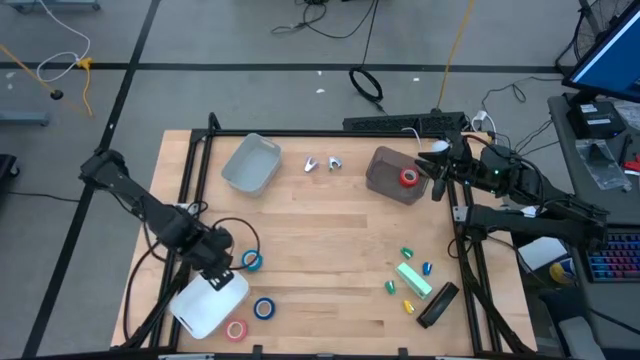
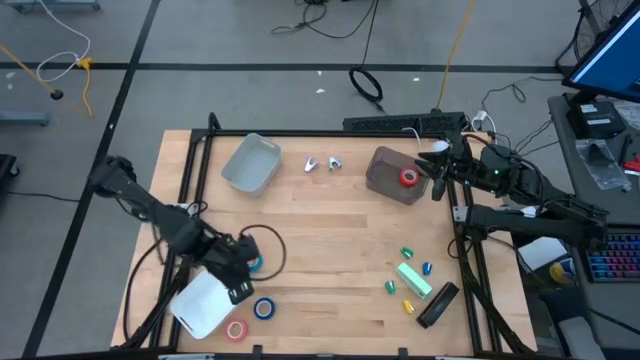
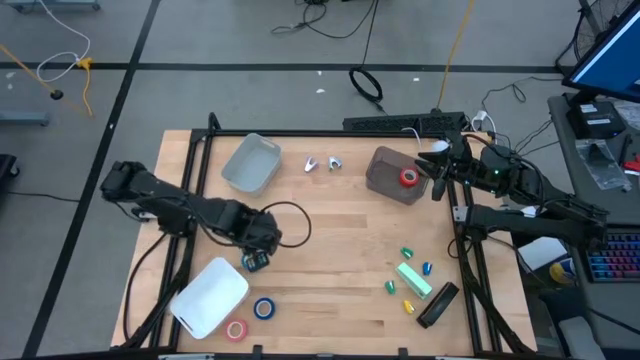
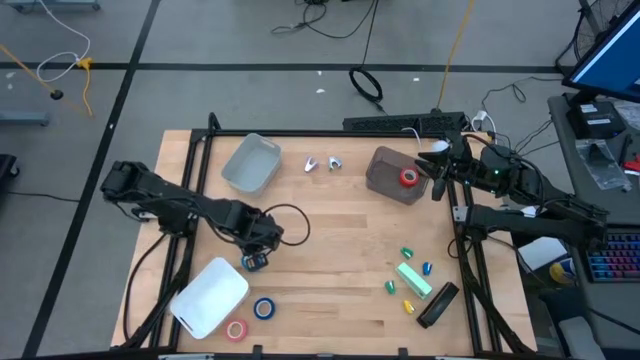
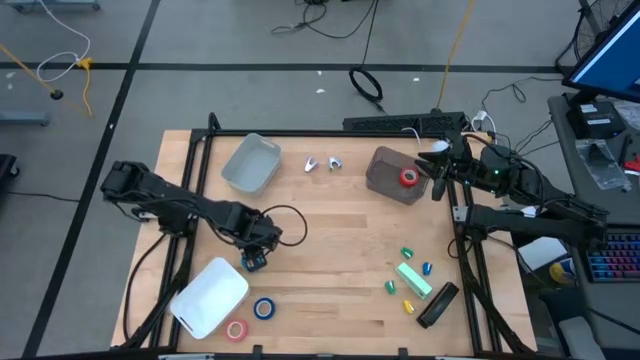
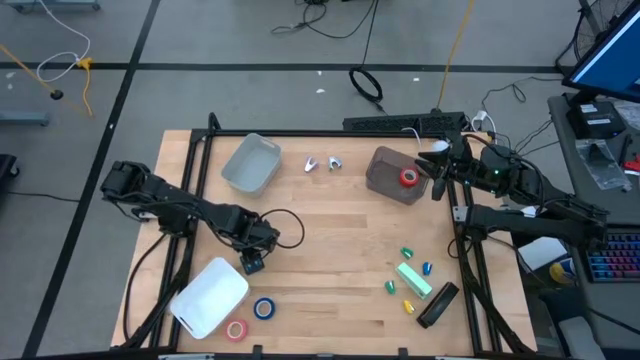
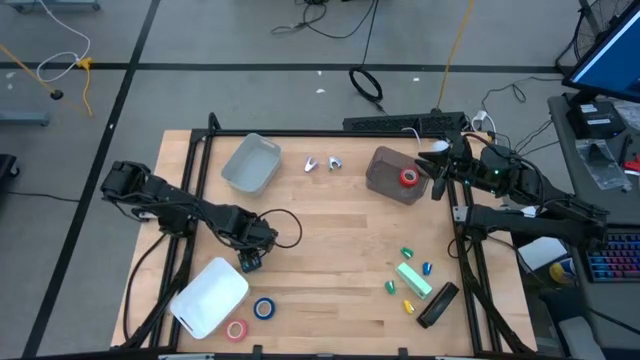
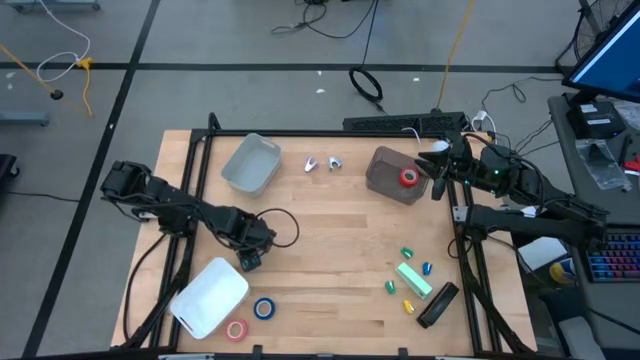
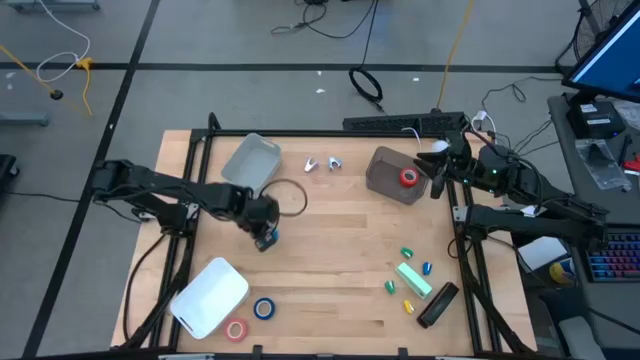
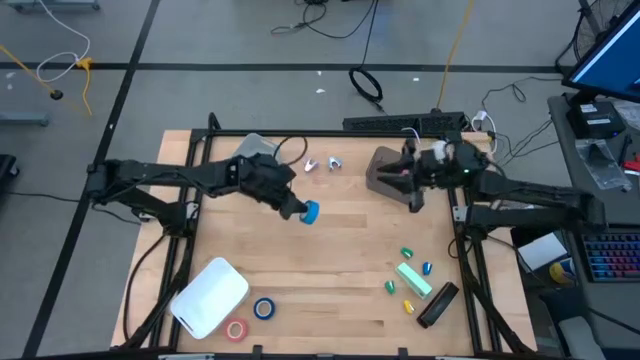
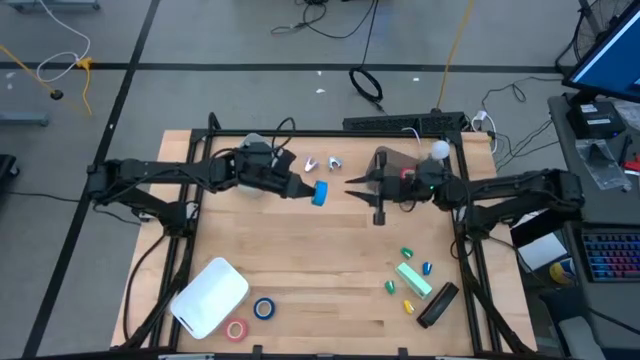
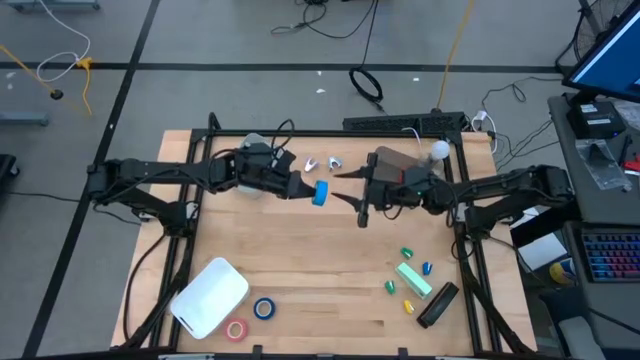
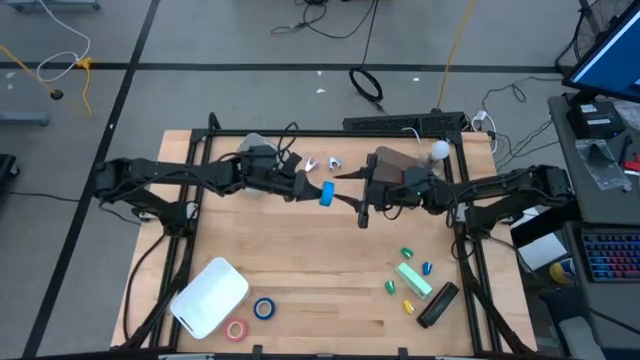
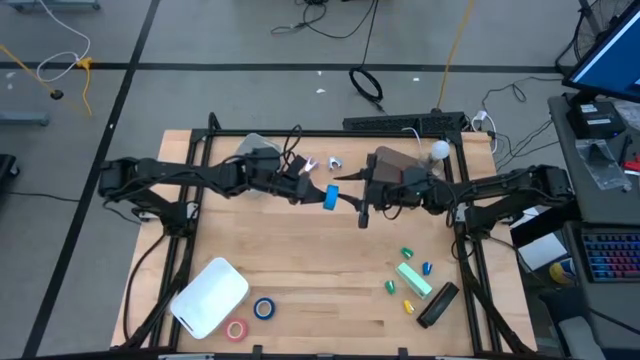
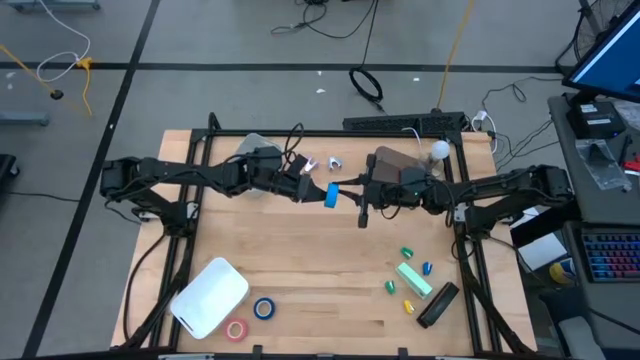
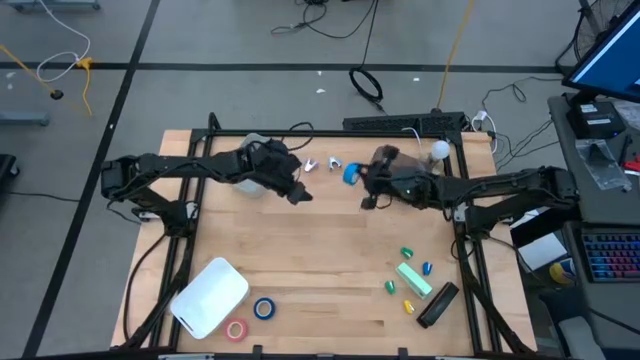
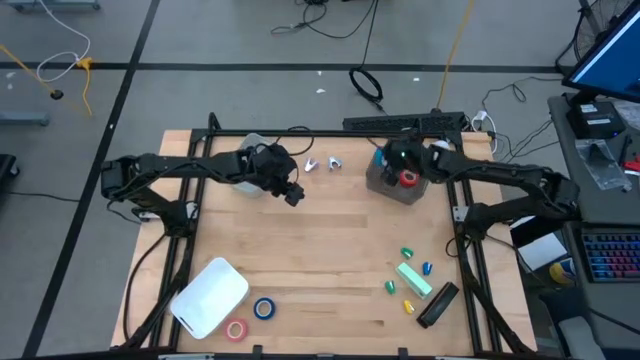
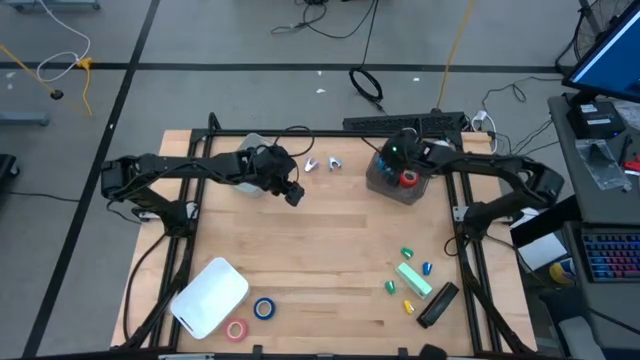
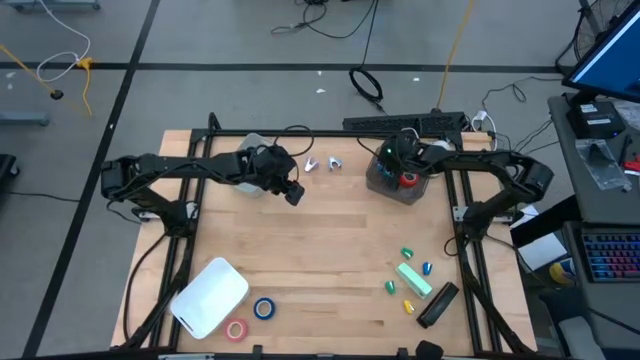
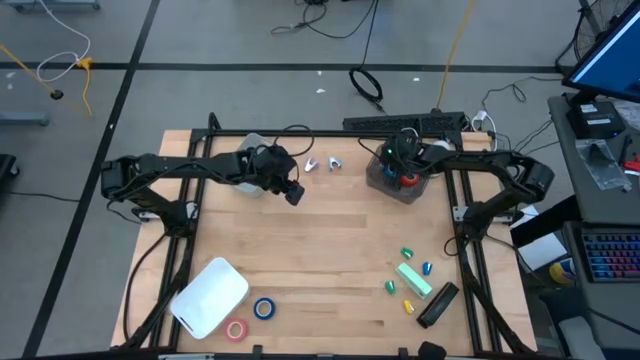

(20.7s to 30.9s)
Task: Pick and place Stapler, Stapler remover, tape
Put the light blue tape into the black bin

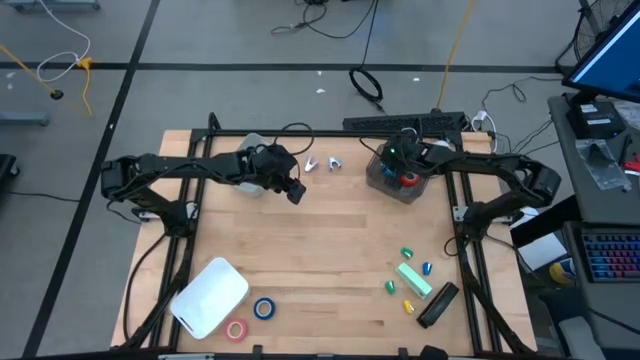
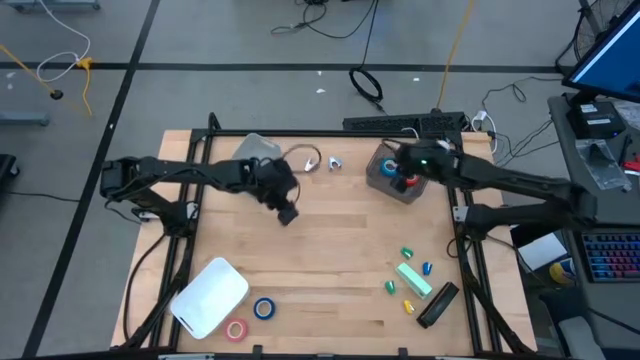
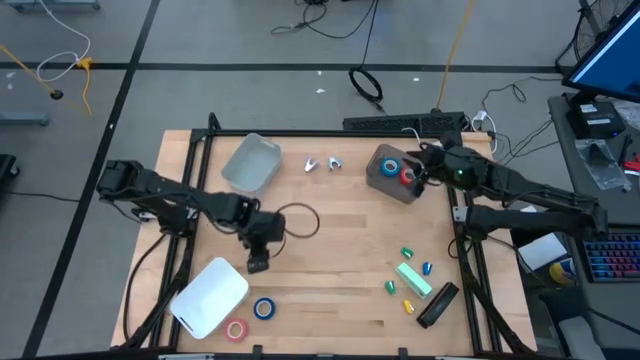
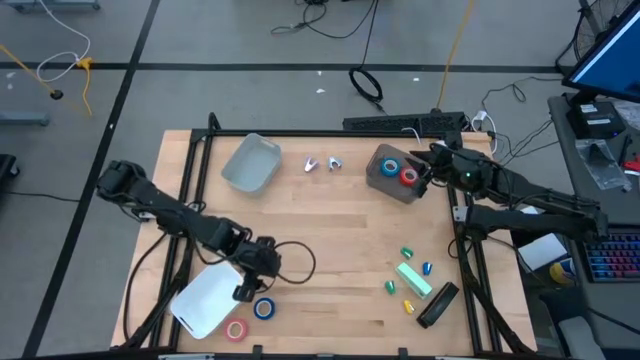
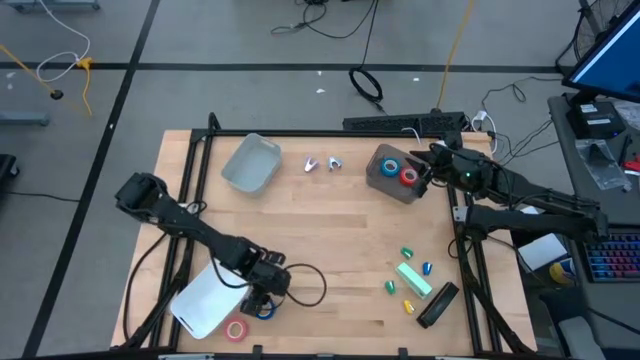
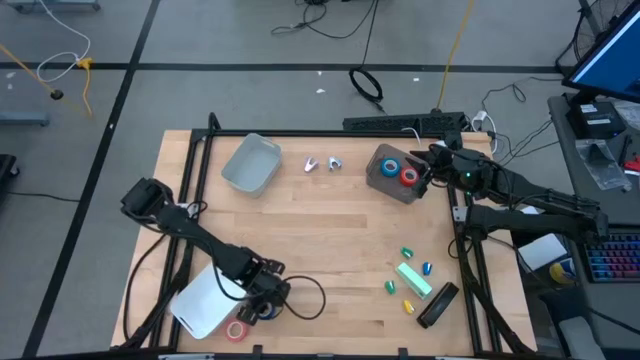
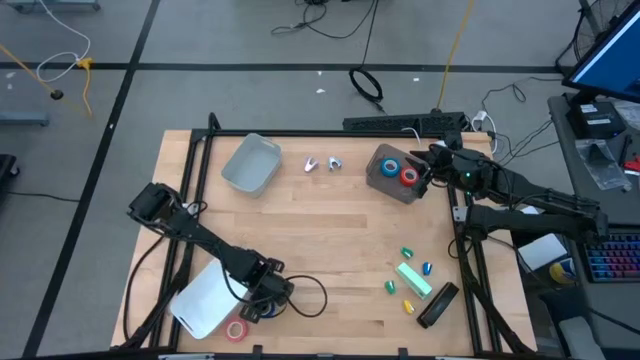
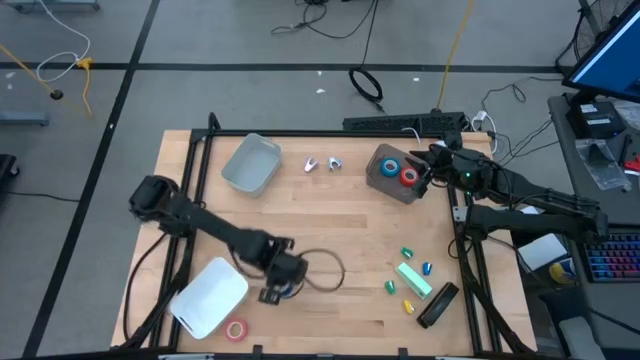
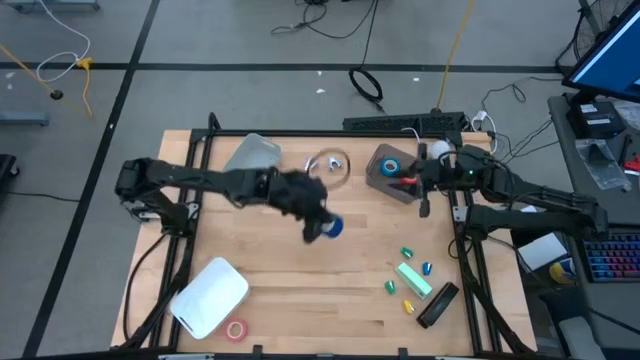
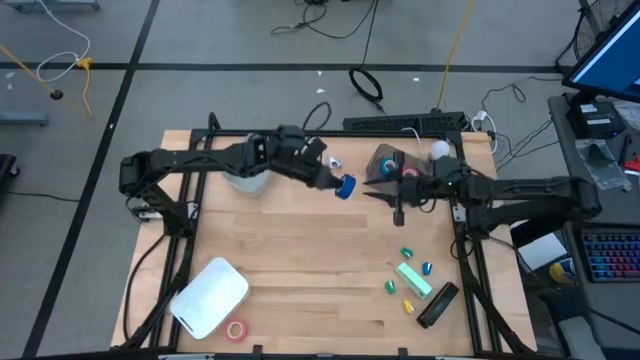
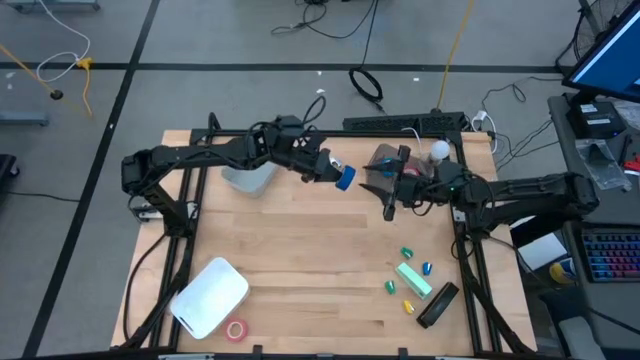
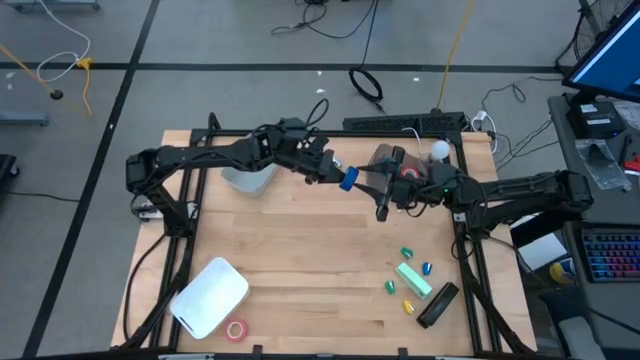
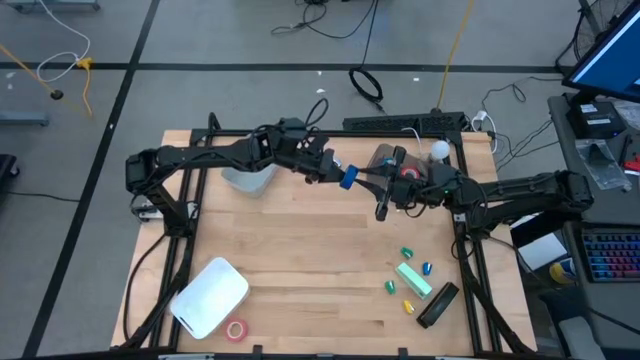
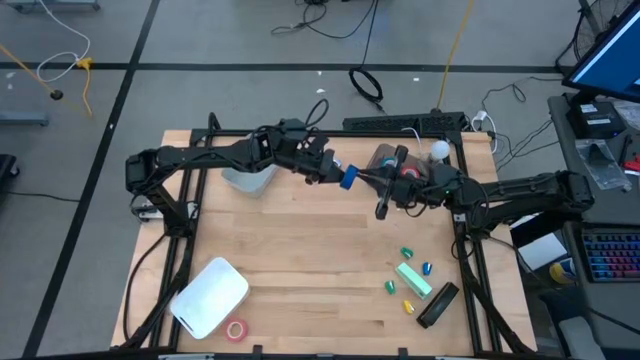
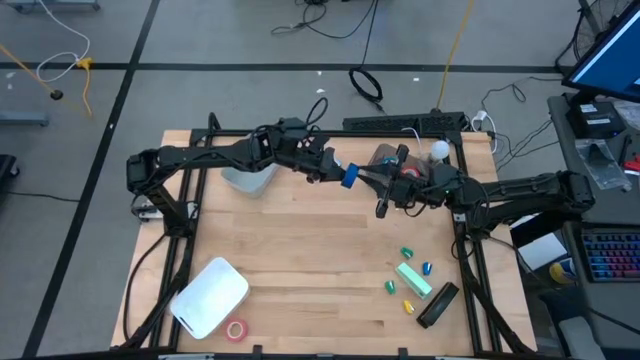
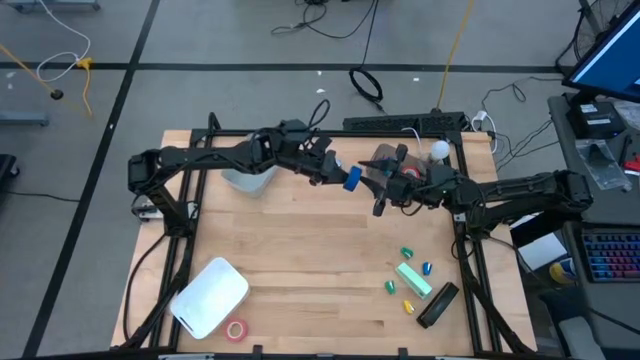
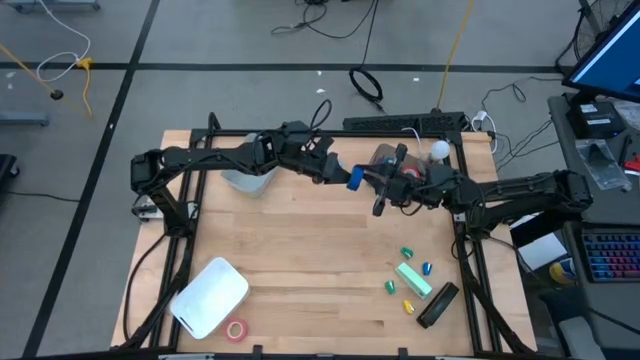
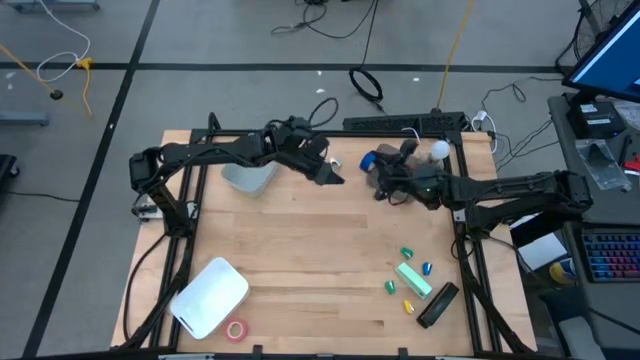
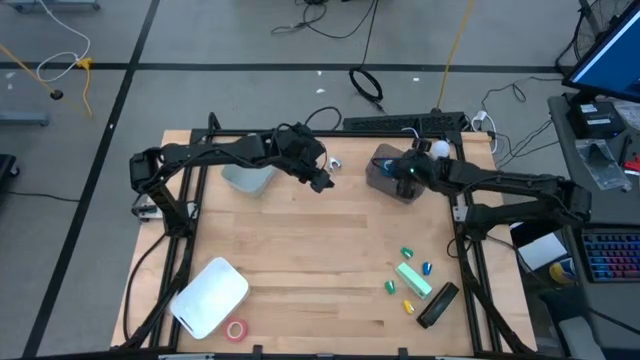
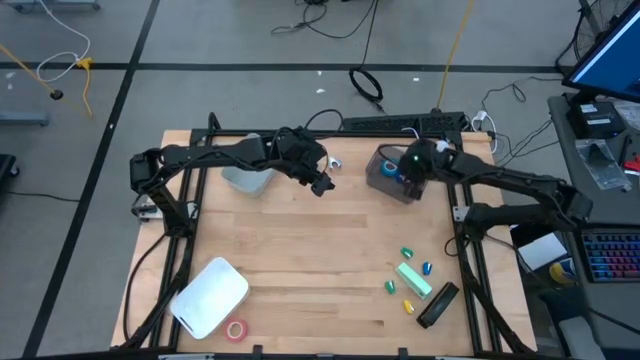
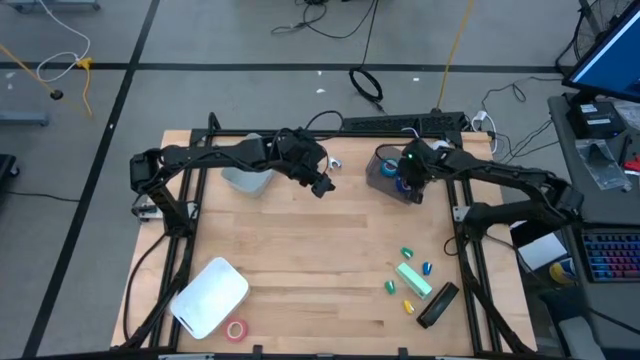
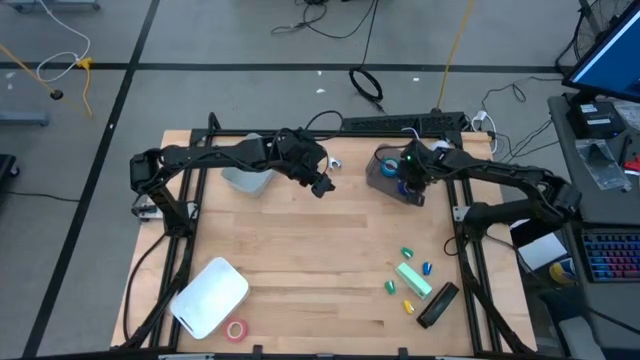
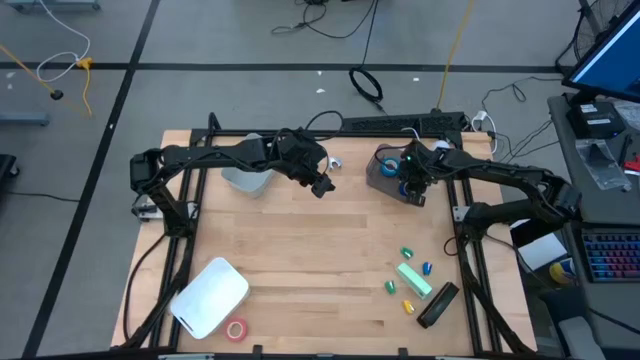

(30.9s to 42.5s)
Put the blue tape into the black bin
